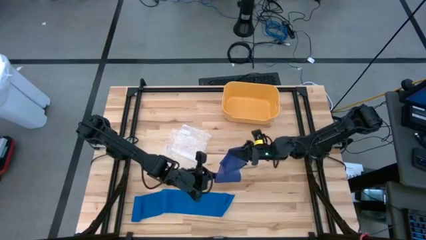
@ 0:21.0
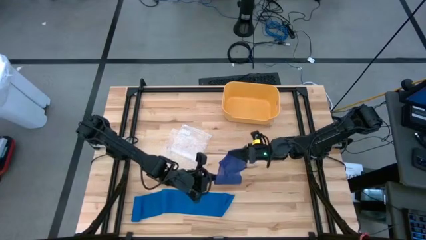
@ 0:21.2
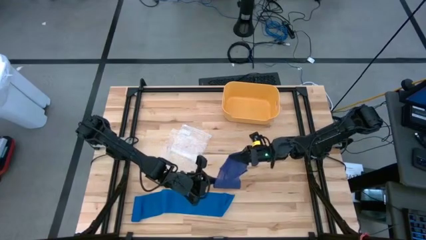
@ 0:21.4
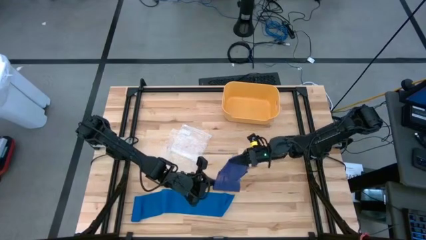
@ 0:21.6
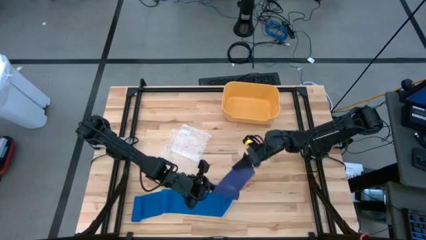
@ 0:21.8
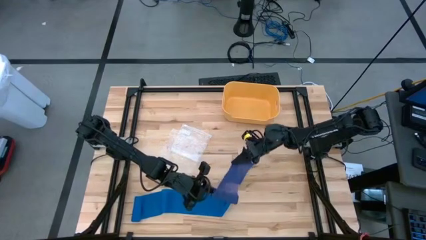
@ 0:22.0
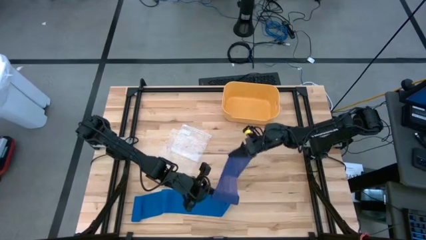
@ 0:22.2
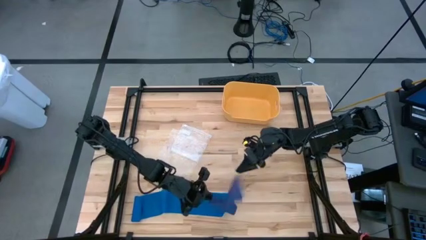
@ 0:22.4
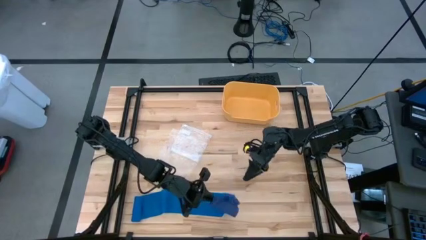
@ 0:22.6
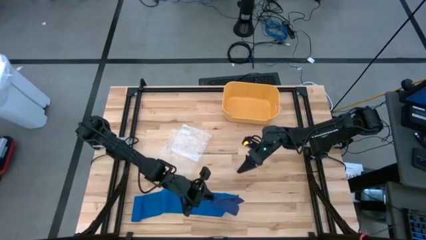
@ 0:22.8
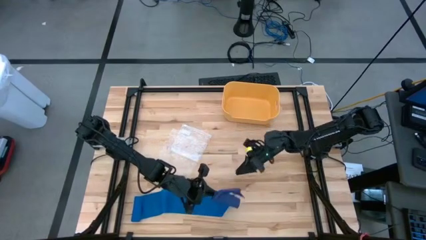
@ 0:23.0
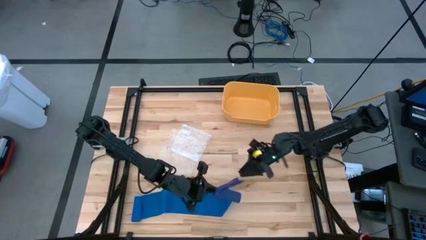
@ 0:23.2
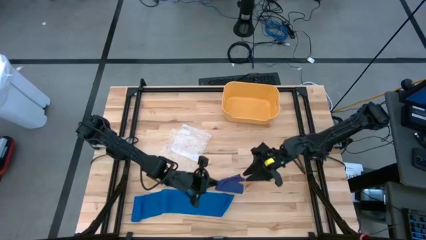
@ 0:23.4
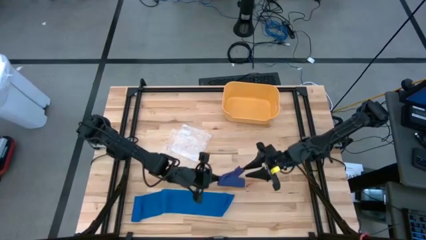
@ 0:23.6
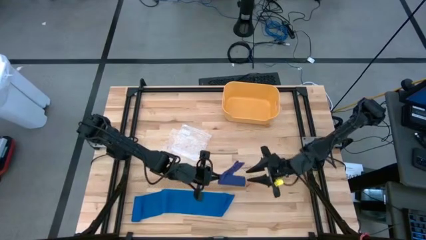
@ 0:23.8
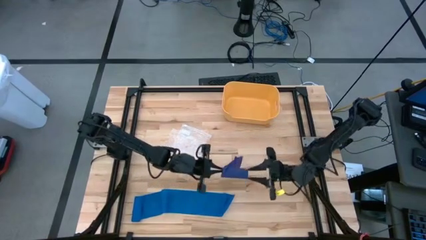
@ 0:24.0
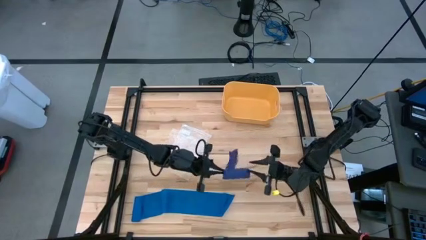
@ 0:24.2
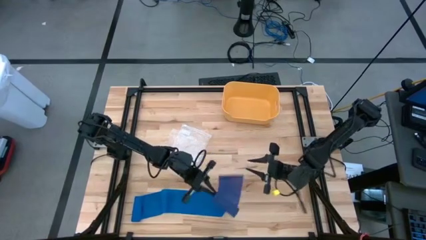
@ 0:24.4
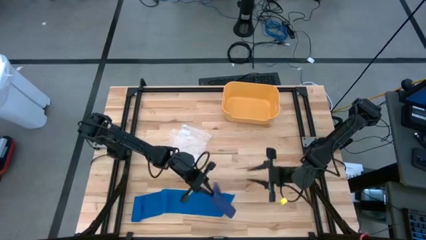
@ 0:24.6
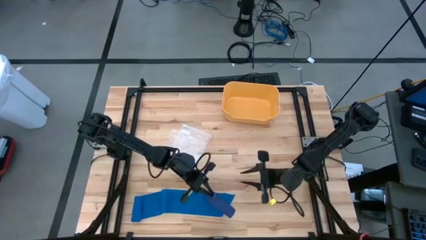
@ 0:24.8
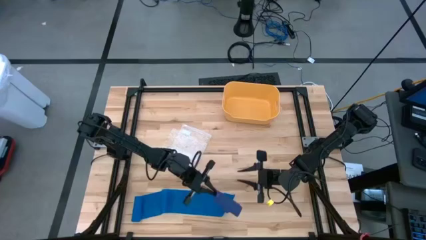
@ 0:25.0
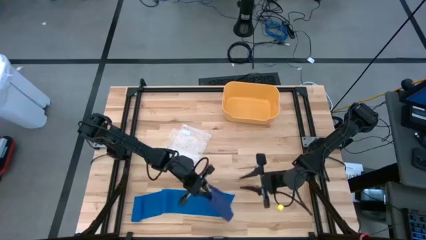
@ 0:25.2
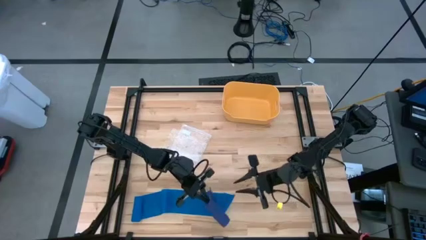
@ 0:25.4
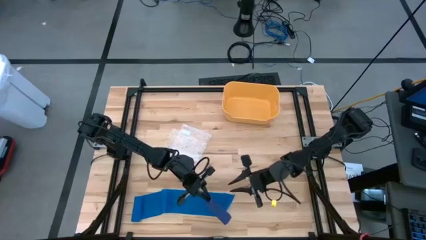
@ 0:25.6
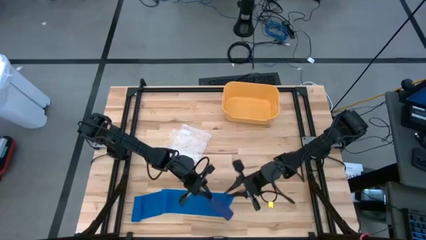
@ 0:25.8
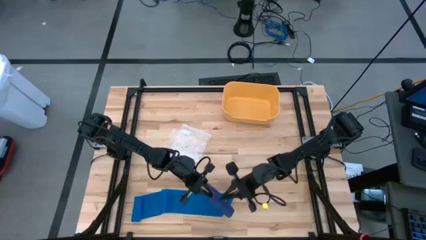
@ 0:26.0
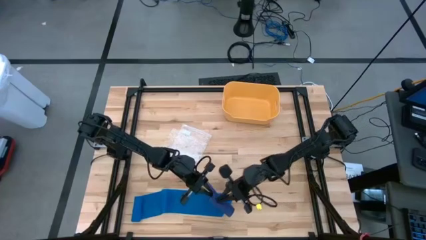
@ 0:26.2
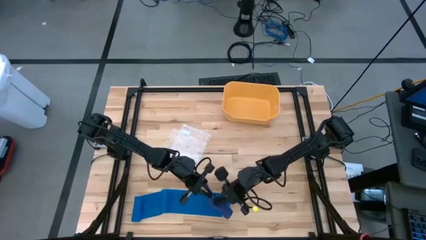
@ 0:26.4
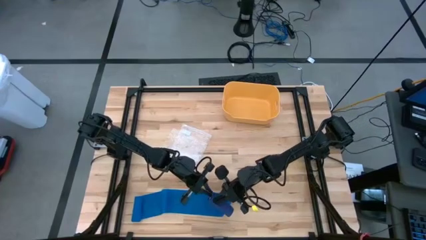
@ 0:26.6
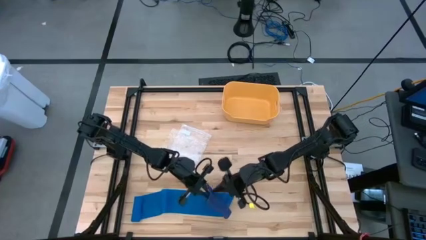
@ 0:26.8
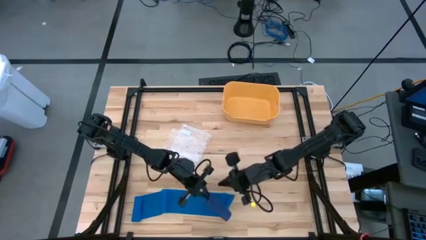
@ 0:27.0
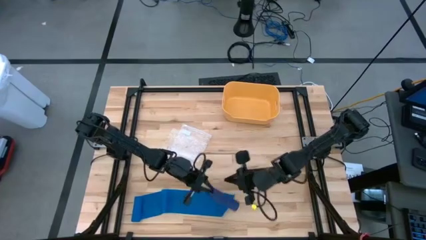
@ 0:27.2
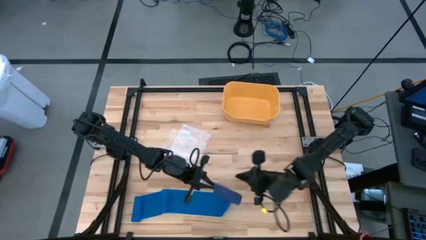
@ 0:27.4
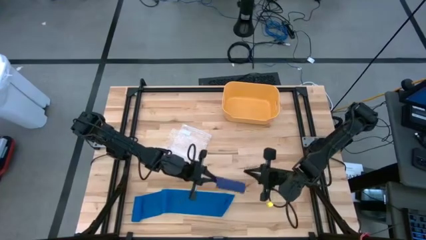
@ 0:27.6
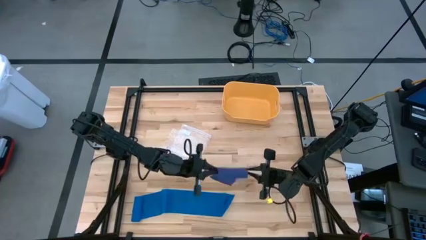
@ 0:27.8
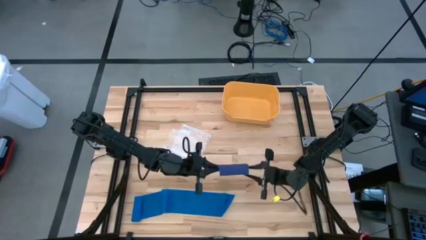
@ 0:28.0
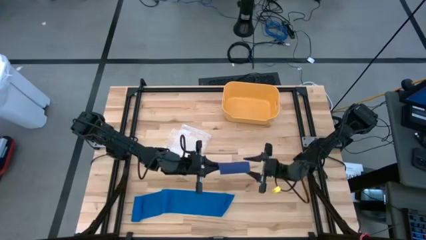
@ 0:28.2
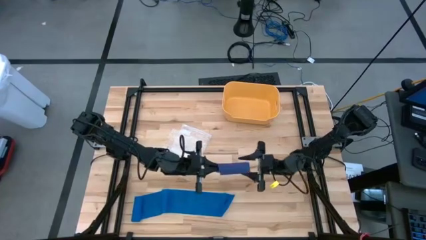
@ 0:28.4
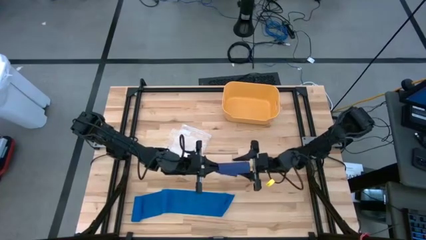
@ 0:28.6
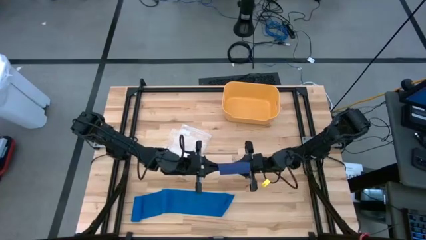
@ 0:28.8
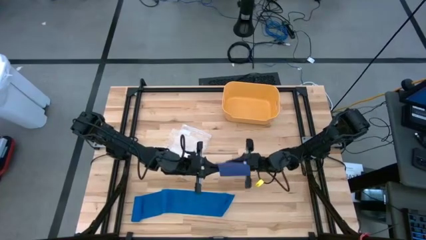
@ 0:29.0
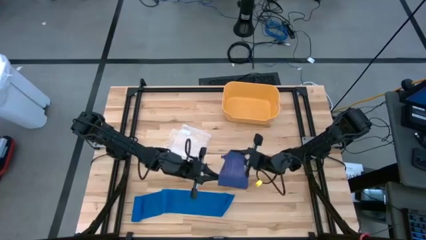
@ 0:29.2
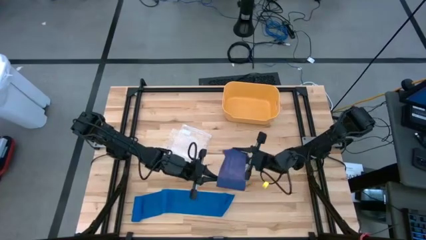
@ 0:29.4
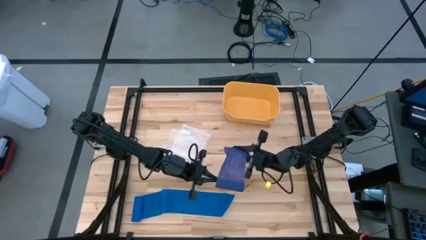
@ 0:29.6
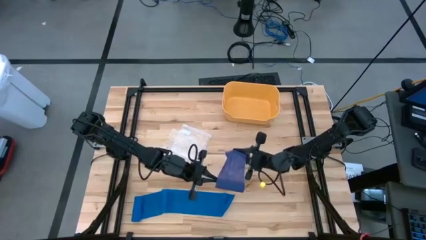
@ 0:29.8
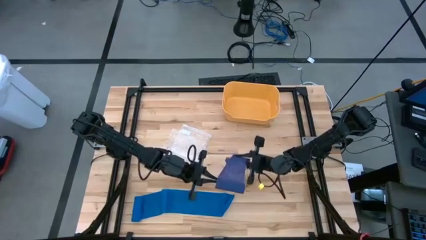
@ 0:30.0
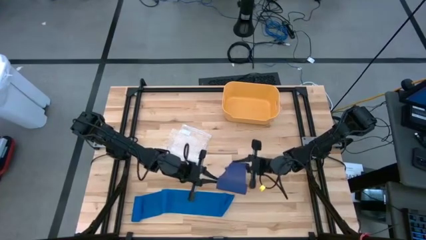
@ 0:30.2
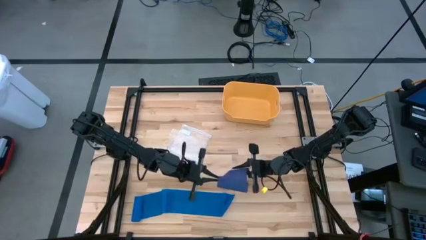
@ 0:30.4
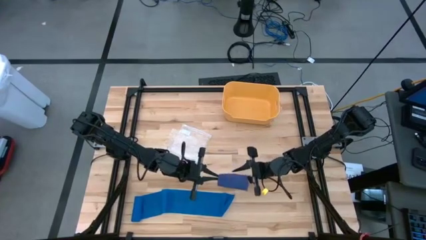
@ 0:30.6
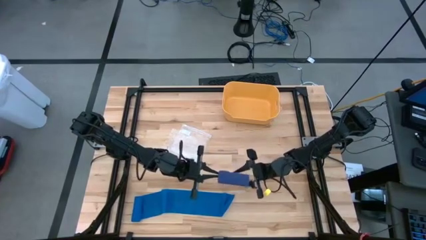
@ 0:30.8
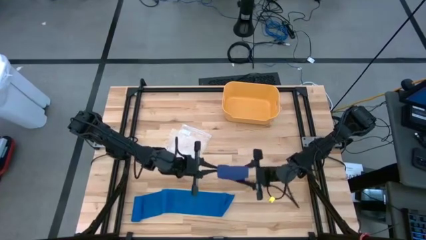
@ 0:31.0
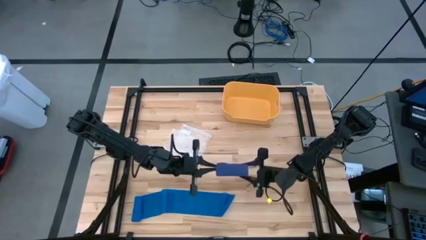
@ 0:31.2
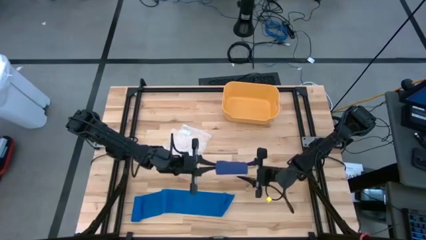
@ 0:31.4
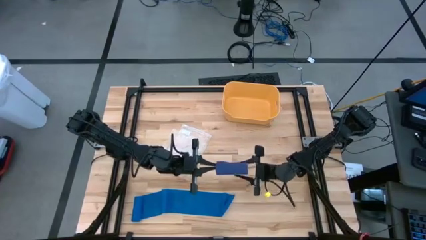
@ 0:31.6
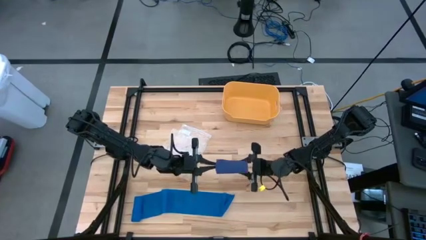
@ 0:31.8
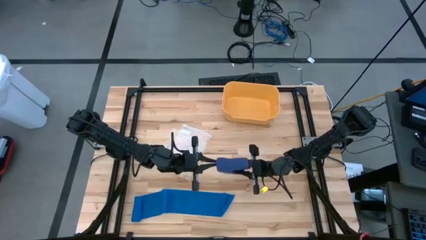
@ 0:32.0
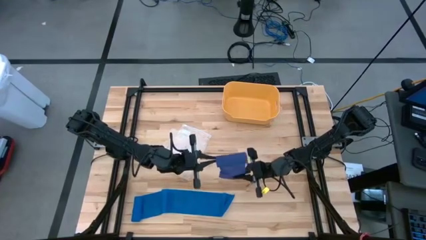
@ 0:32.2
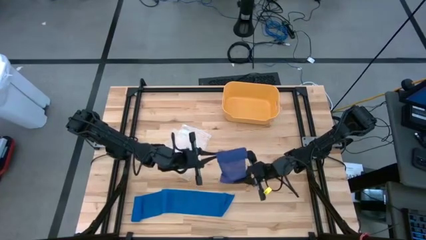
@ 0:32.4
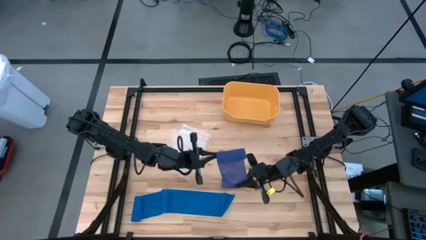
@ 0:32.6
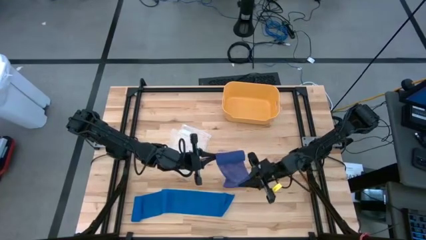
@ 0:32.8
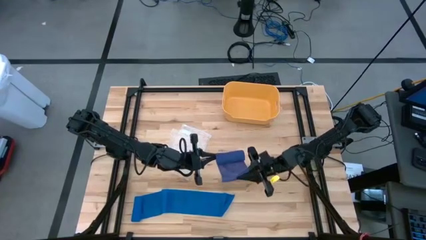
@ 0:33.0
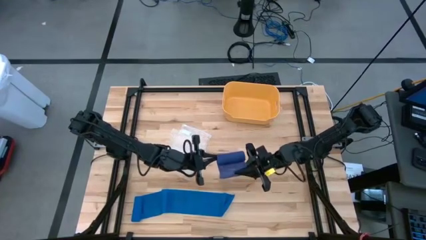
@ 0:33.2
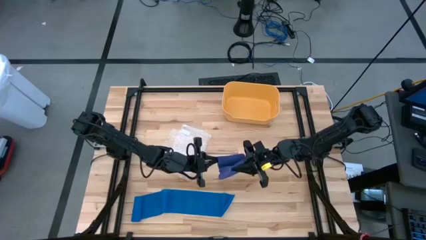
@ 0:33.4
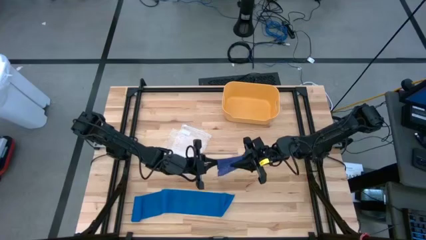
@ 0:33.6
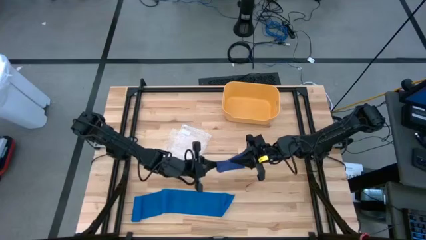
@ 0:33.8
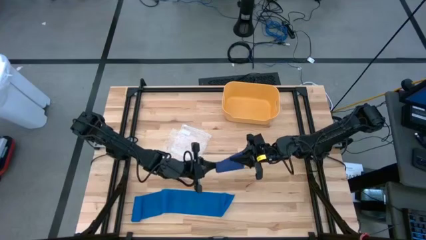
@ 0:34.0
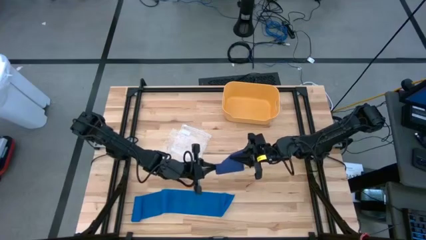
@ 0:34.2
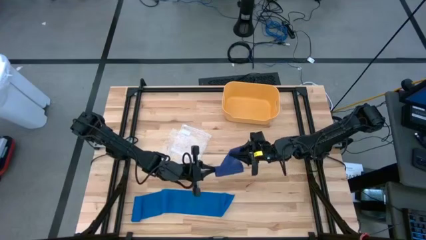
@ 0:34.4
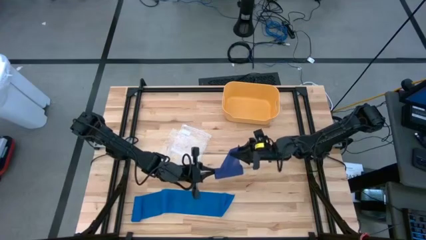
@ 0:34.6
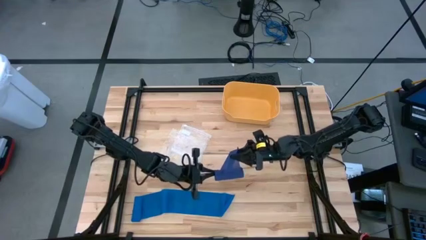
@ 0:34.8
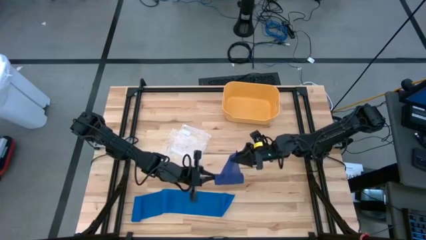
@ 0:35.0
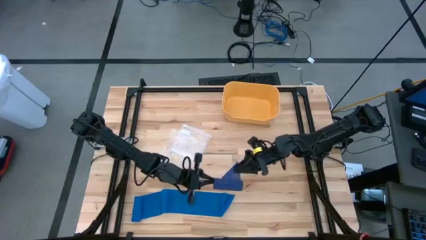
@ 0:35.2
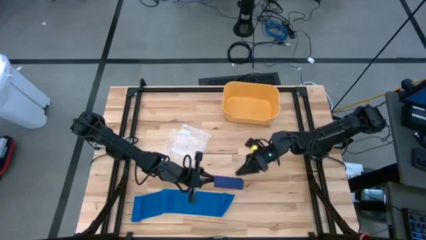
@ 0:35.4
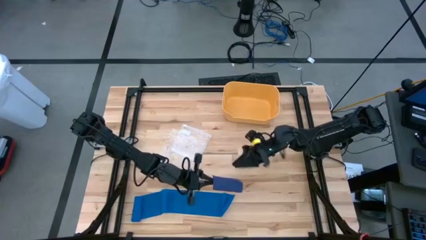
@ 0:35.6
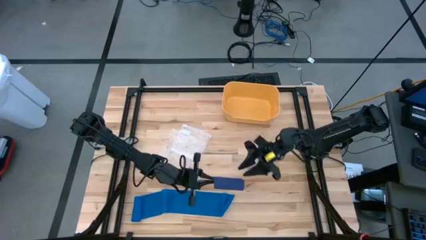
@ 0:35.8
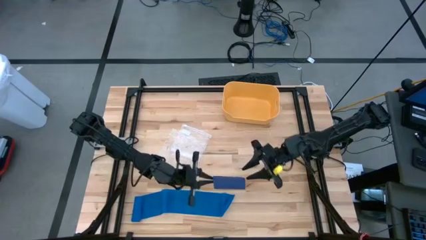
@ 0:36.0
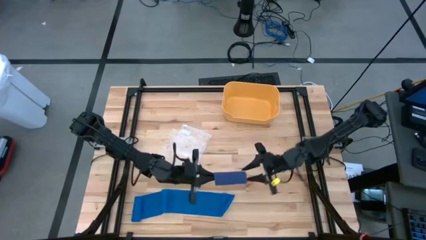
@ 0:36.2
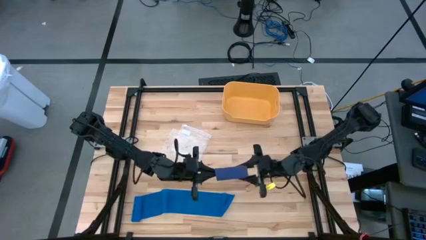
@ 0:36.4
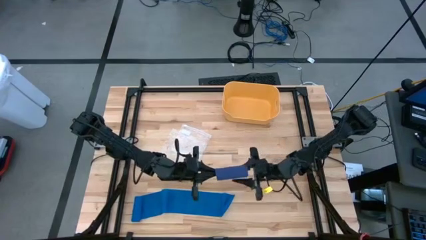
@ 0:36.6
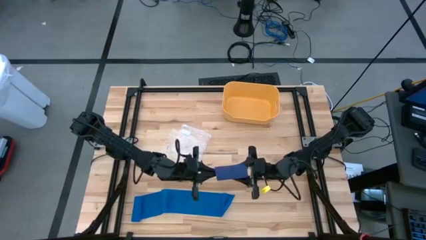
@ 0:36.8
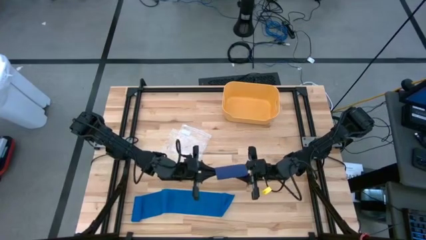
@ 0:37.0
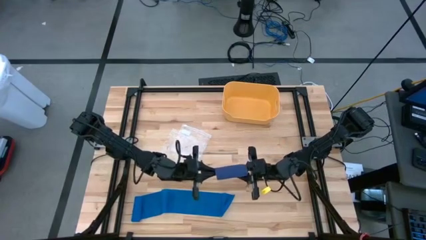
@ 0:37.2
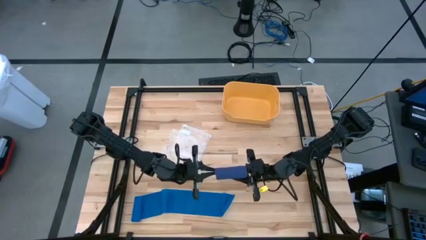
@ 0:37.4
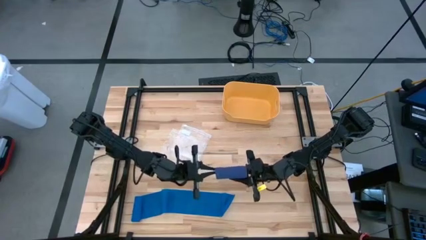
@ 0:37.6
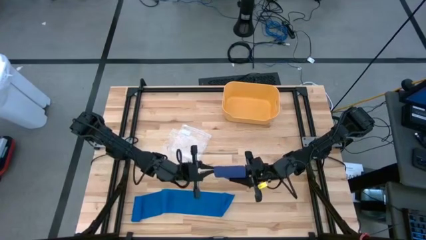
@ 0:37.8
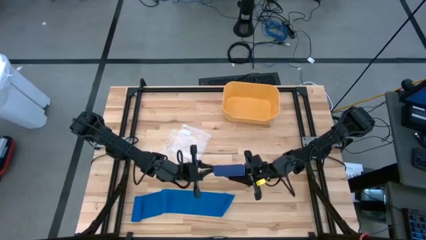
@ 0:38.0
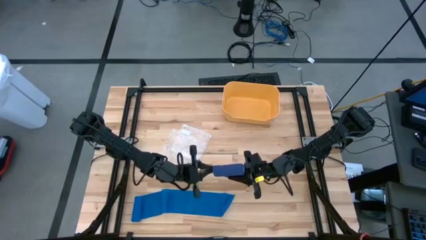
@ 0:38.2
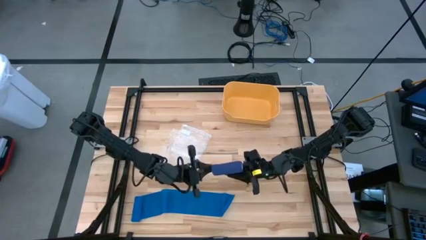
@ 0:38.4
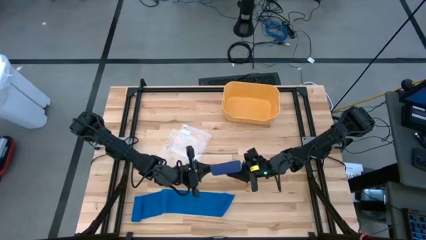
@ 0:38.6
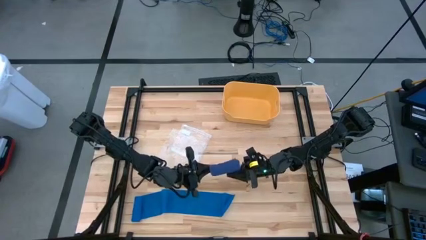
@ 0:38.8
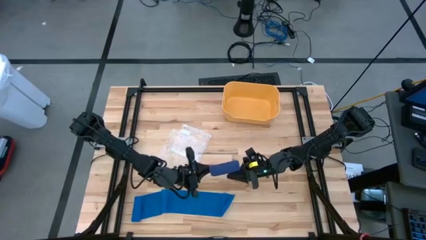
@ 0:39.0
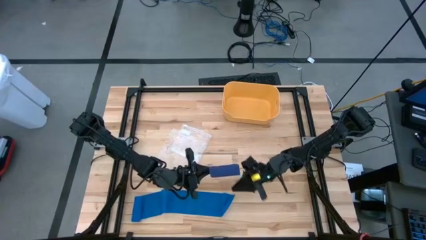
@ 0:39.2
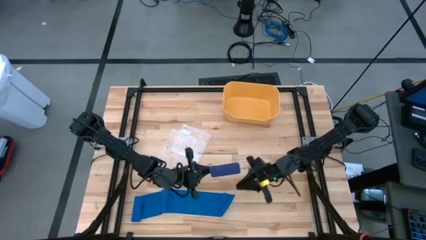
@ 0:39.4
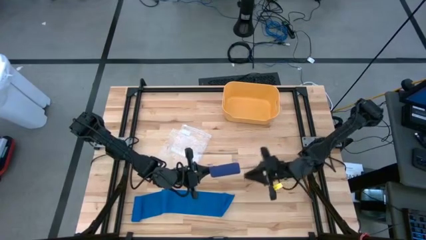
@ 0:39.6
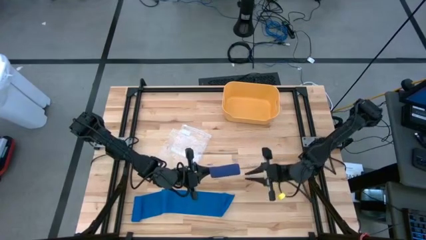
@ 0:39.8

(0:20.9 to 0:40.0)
Task: Roll bandage
Roll the dark blue bandage
